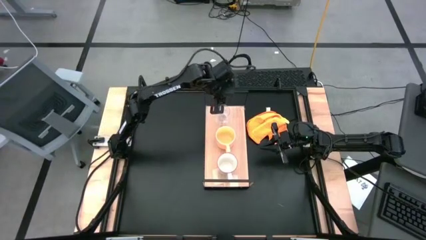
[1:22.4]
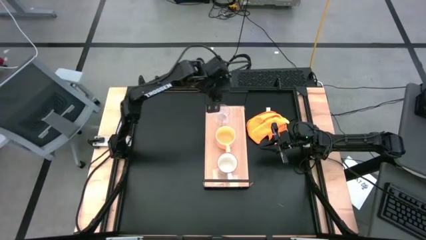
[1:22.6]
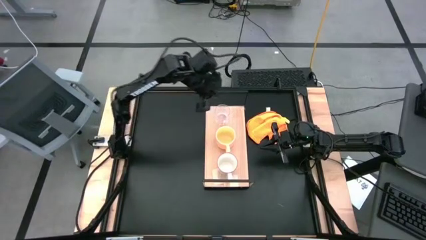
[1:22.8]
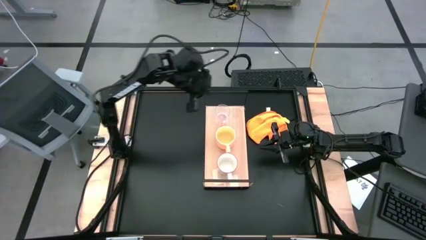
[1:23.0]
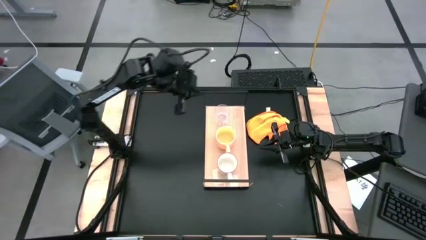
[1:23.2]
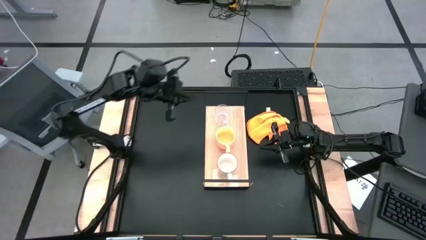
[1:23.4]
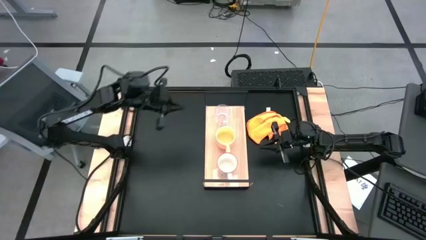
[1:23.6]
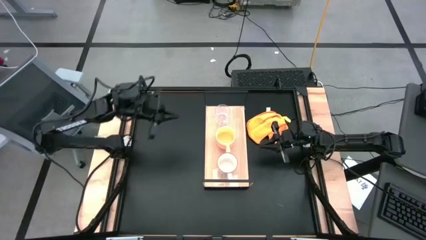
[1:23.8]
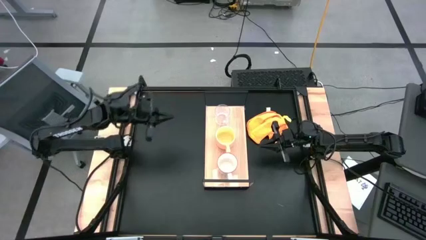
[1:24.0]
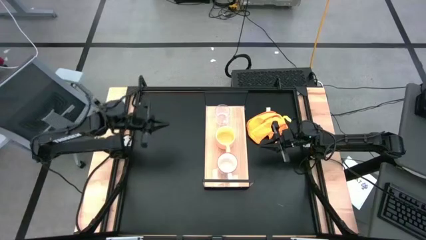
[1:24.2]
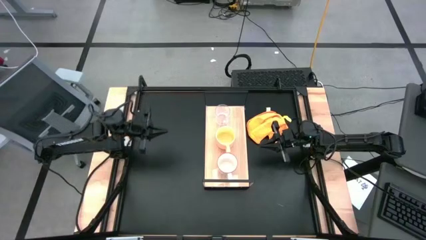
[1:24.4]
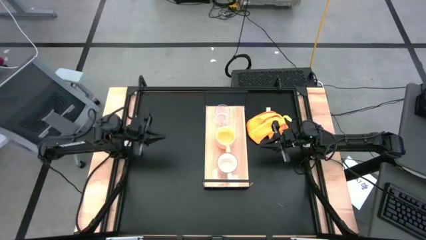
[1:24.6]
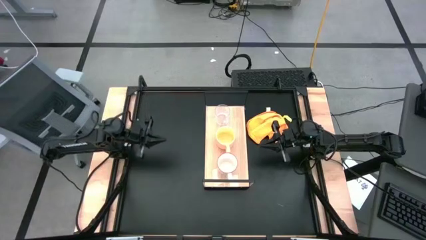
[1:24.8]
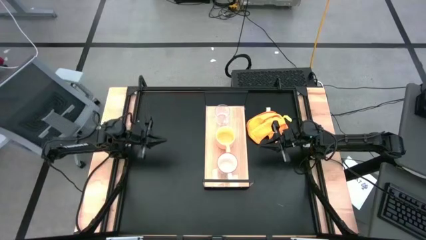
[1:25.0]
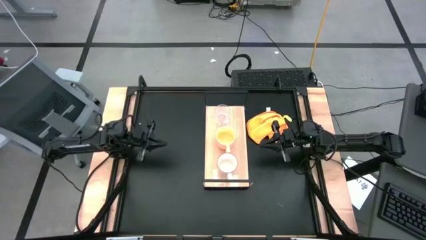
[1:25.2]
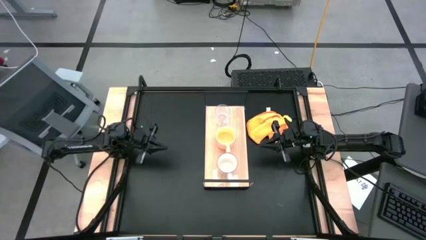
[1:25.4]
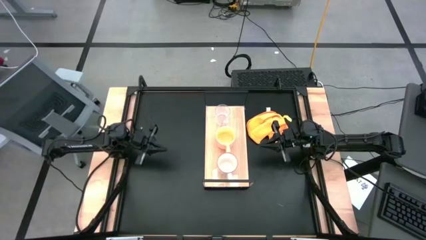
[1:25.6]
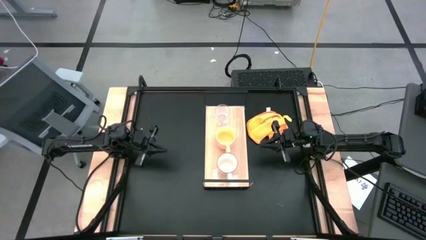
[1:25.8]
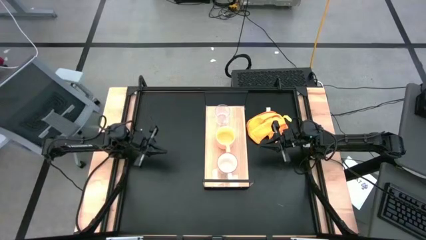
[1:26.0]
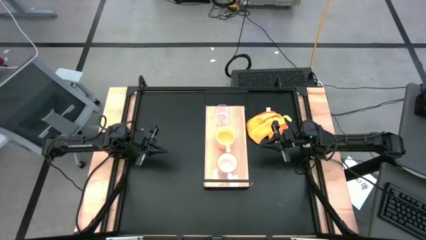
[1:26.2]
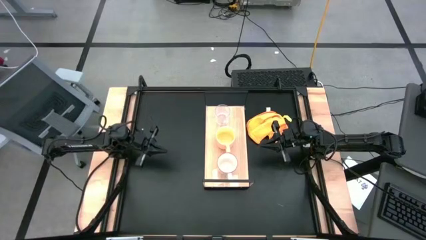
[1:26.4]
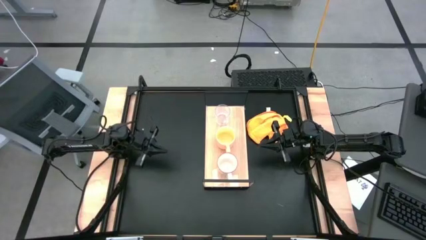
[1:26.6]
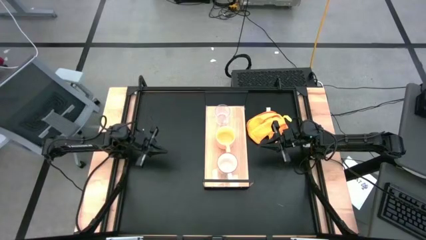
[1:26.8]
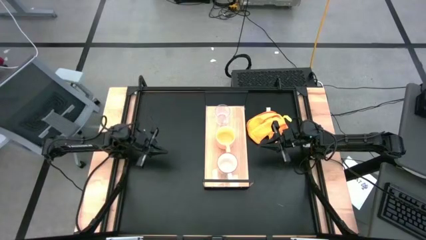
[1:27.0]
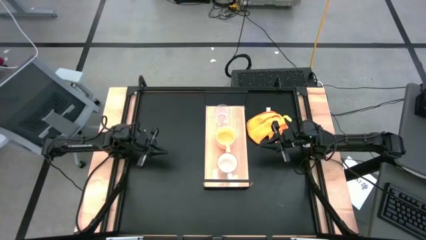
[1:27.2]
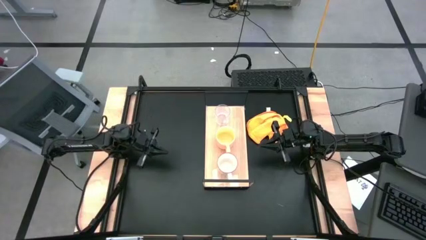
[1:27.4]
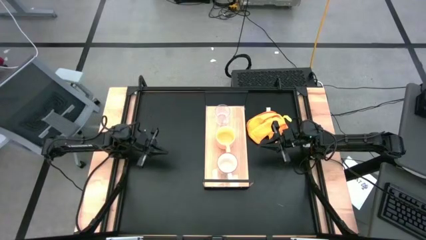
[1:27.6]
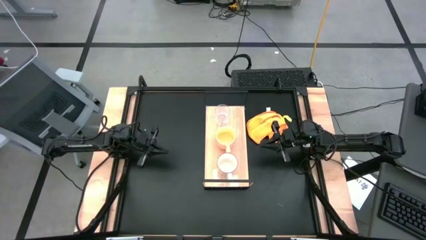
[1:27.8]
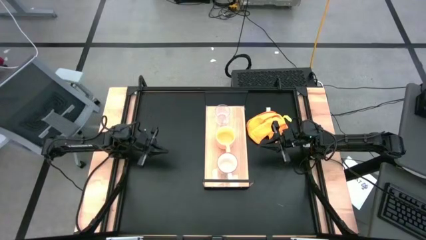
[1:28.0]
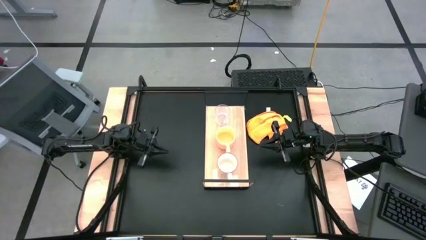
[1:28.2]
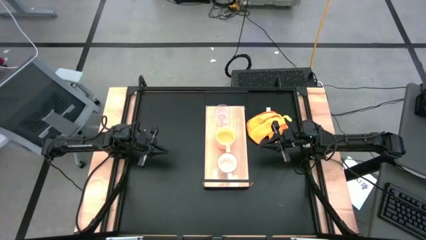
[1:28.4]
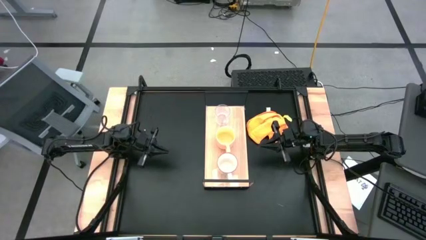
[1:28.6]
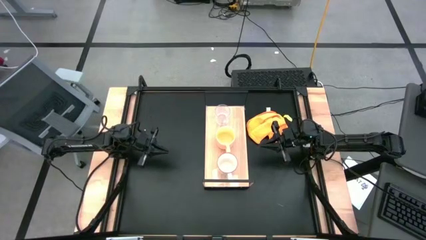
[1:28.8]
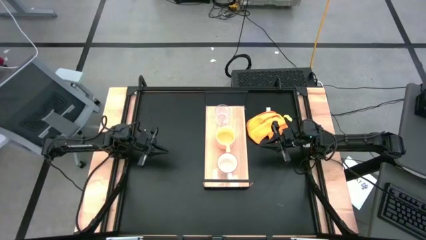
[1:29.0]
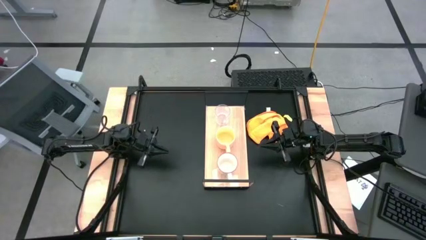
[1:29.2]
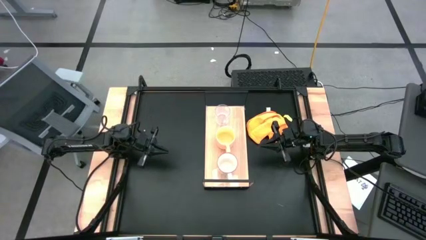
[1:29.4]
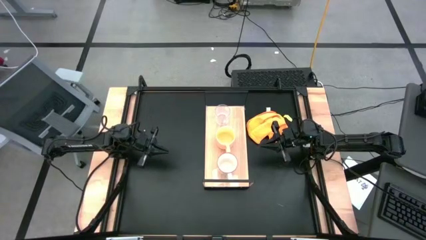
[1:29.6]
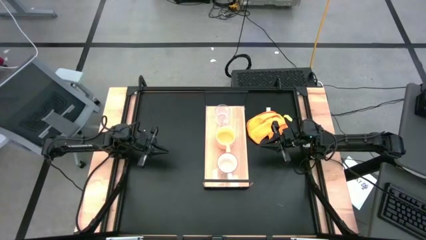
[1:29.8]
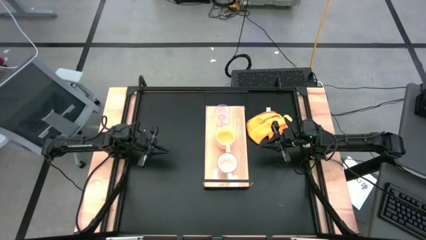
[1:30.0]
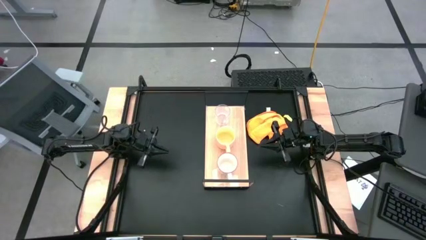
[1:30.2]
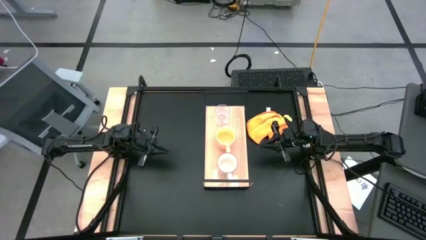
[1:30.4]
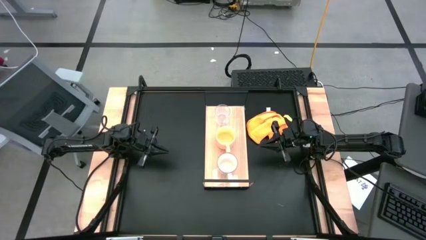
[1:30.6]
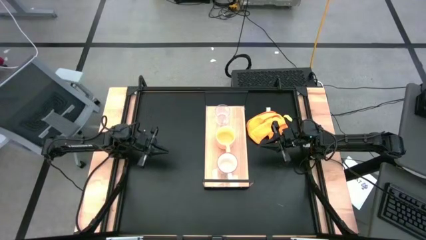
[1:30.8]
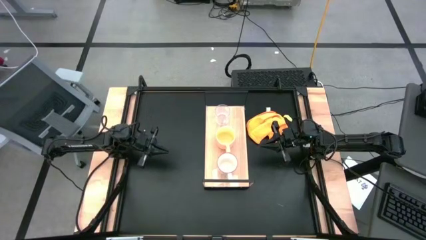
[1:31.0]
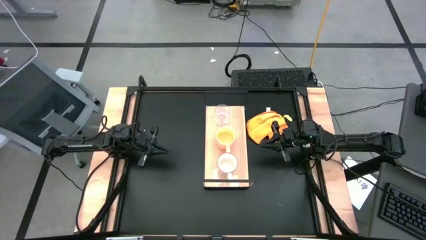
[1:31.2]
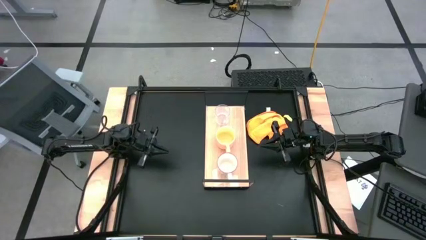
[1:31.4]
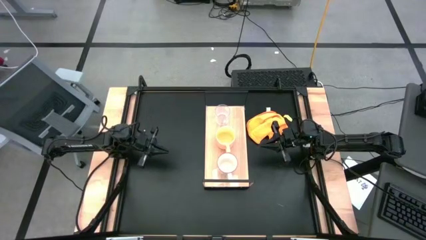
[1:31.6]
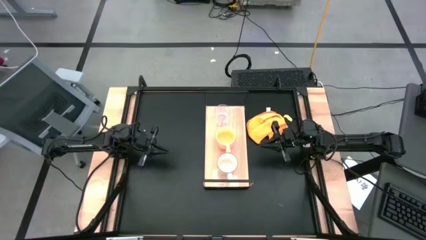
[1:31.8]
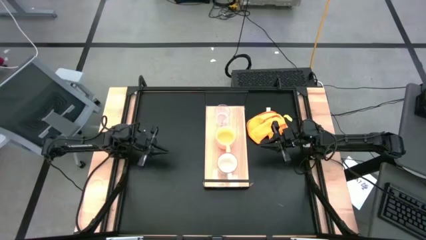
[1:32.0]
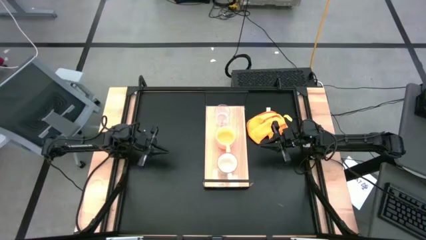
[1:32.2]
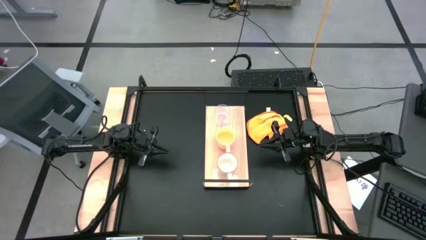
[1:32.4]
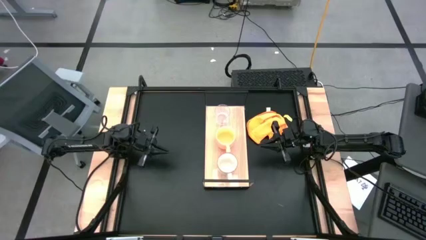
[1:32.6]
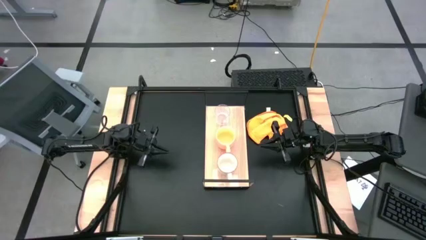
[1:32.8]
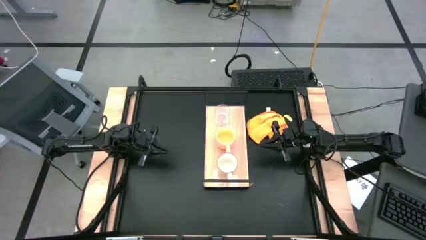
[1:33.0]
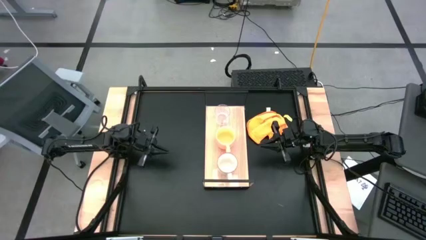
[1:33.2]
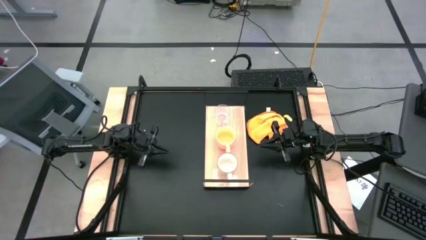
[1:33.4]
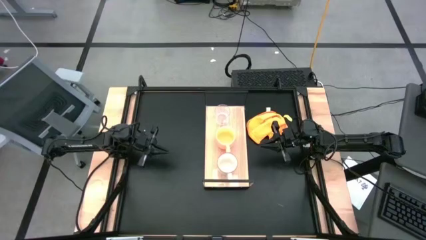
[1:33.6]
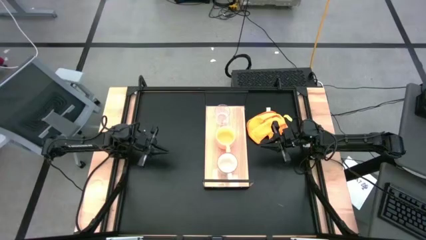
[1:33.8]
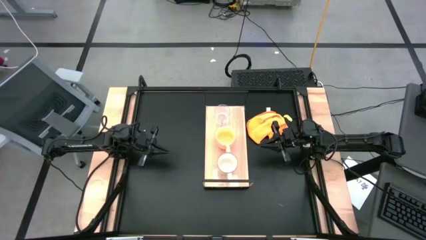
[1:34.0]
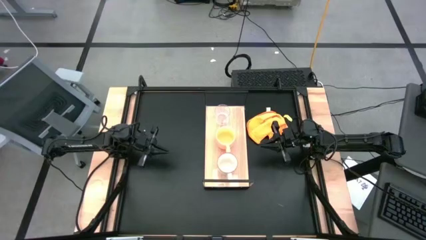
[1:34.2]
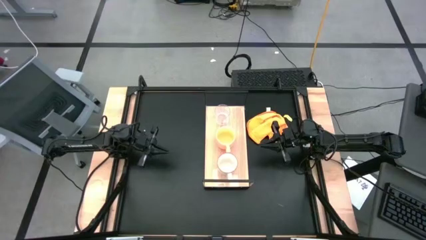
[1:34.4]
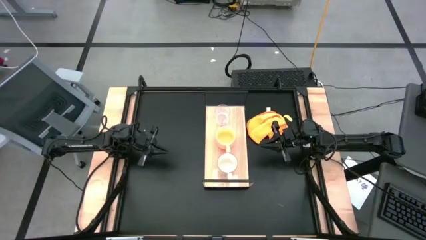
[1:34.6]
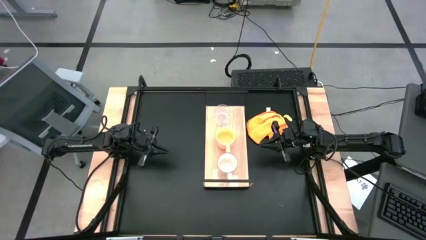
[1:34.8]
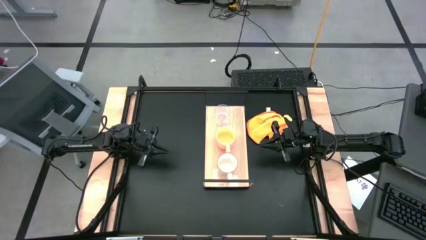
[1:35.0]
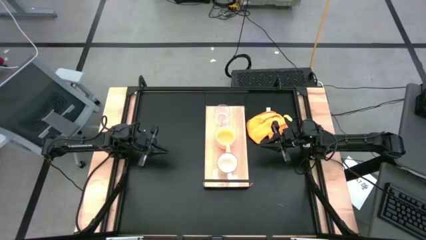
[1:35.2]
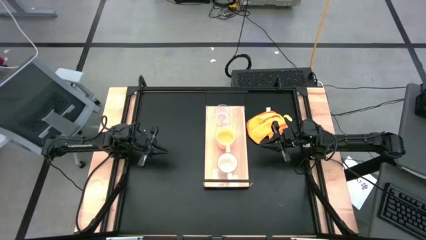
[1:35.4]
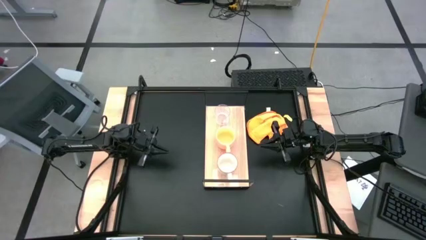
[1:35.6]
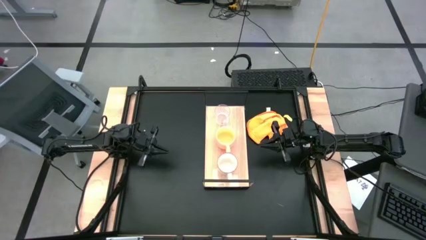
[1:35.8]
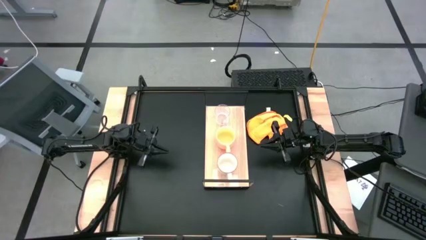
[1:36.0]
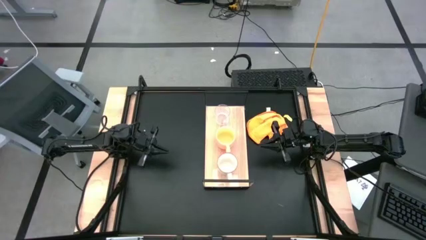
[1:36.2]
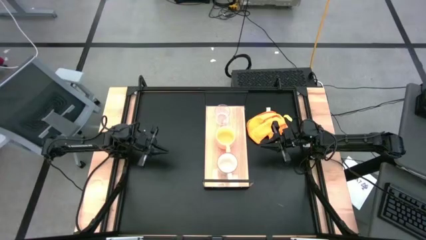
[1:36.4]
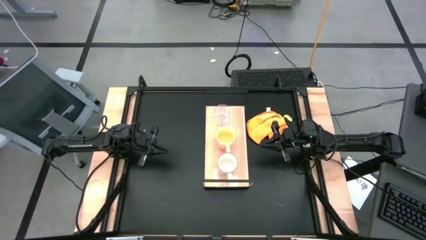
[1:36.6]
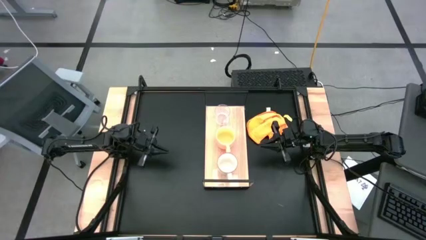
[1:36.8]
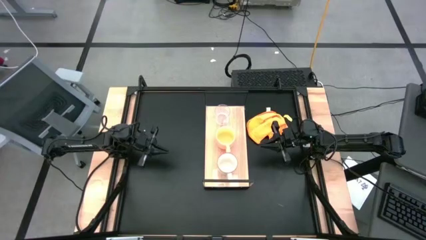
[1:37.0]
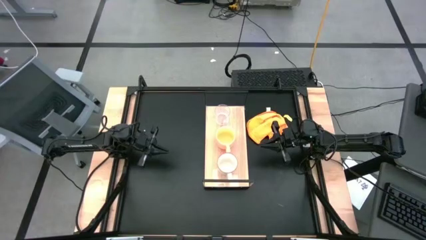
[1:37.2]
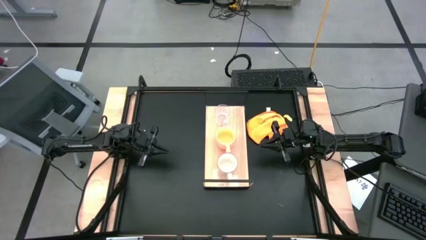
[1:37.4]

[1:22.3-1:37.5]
Task: Stack small to large cups/mugs on shelf
Return to Home Position
